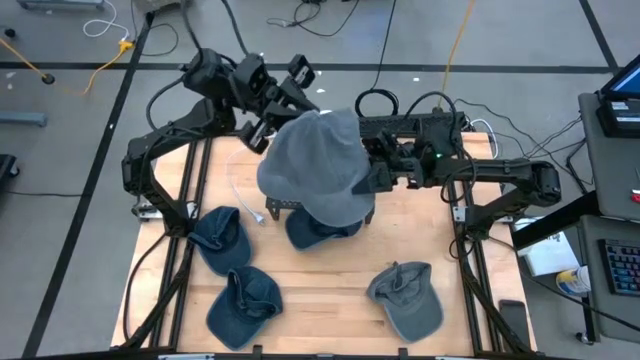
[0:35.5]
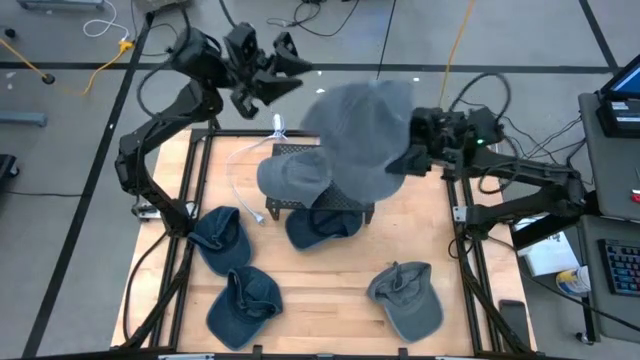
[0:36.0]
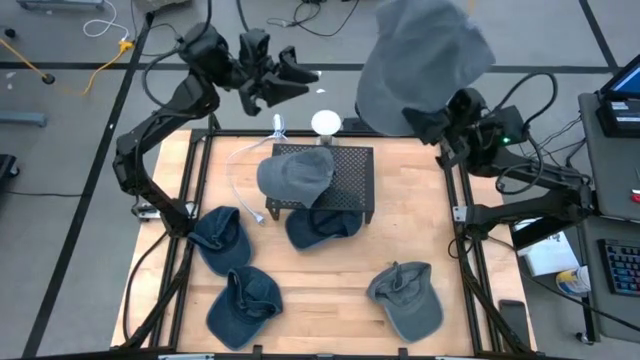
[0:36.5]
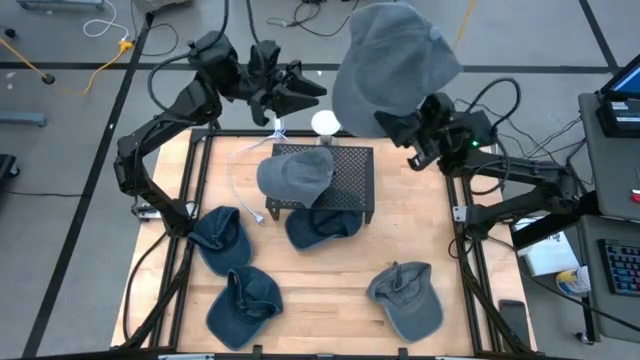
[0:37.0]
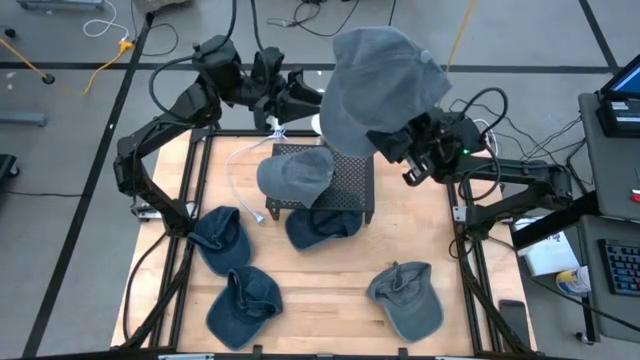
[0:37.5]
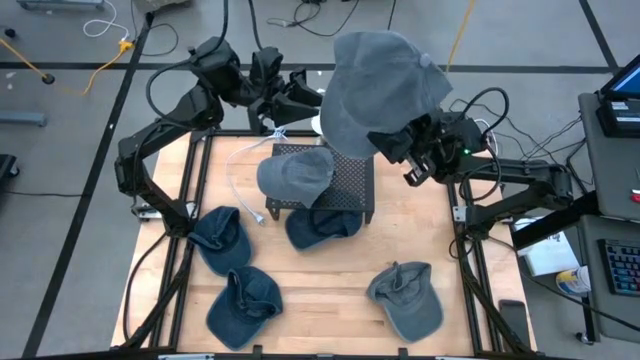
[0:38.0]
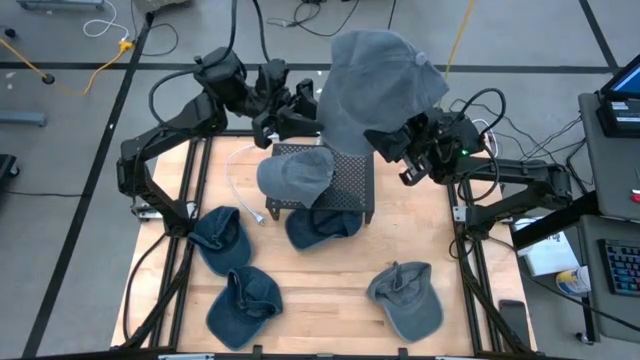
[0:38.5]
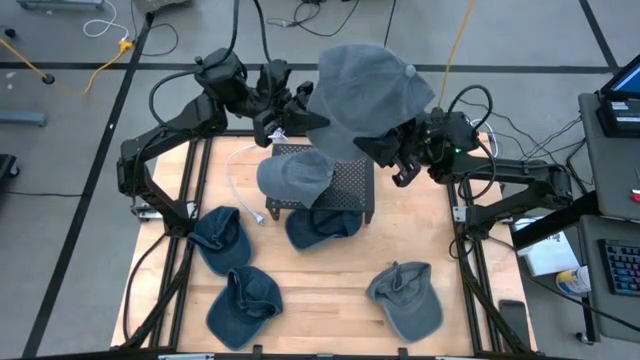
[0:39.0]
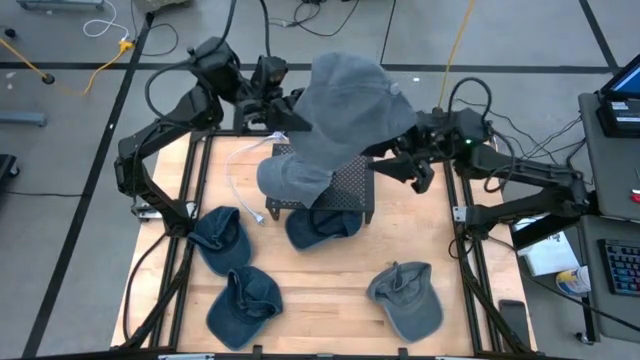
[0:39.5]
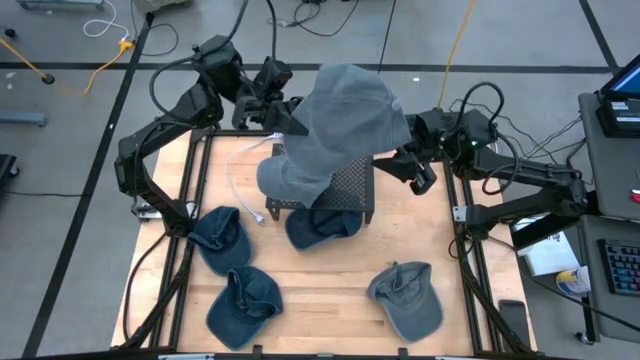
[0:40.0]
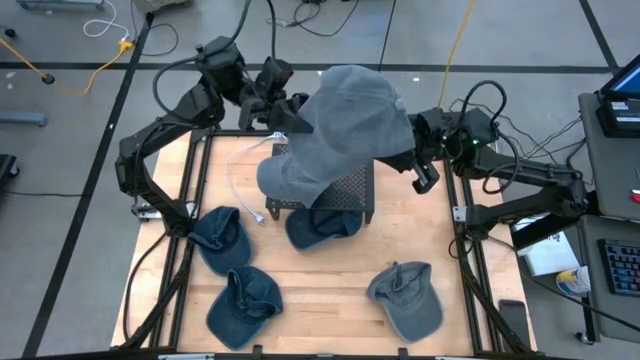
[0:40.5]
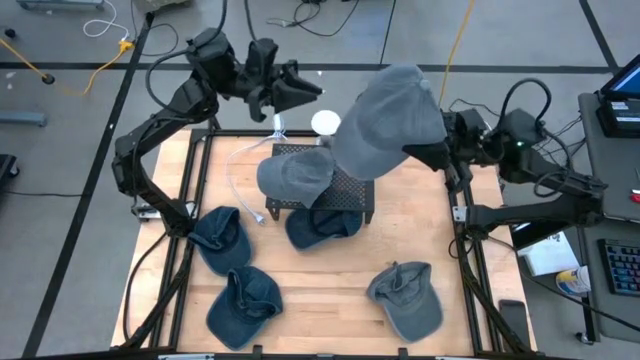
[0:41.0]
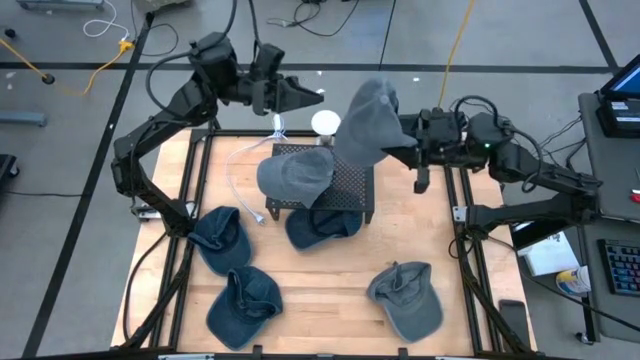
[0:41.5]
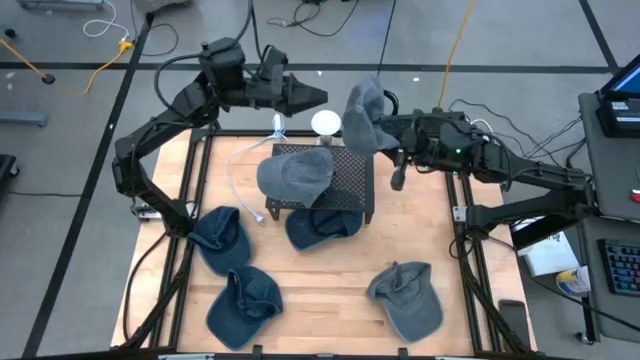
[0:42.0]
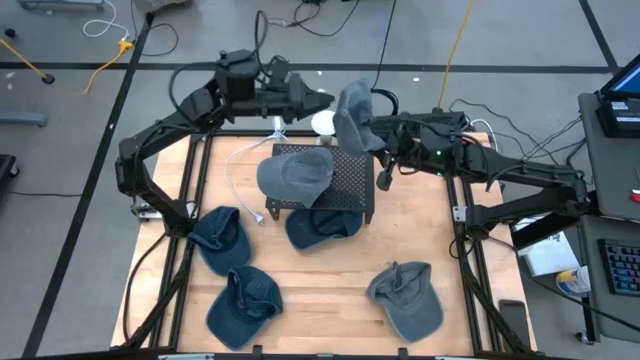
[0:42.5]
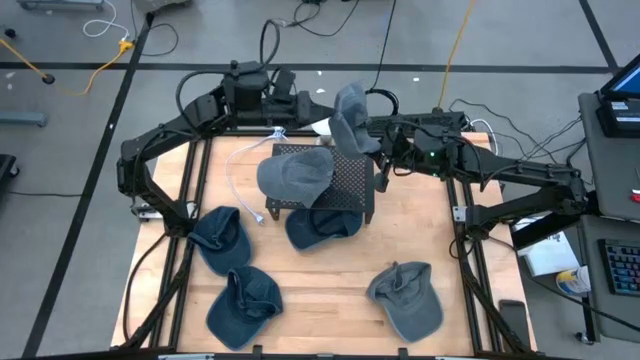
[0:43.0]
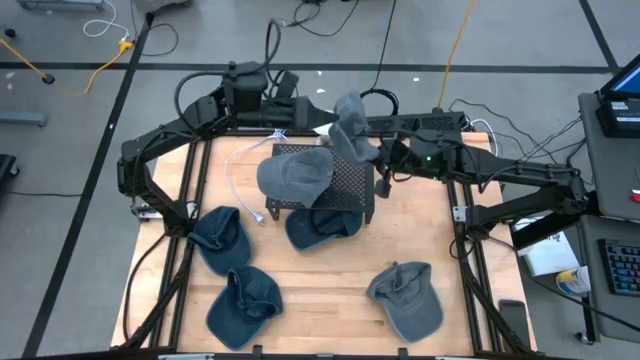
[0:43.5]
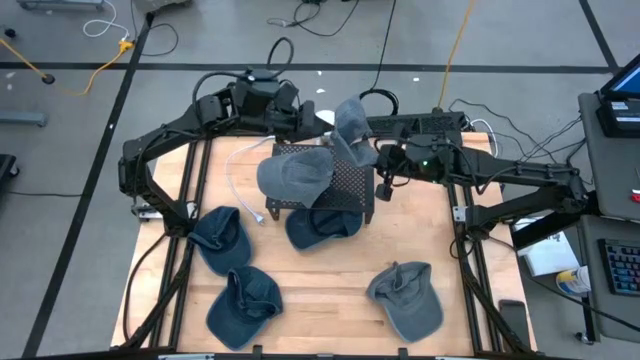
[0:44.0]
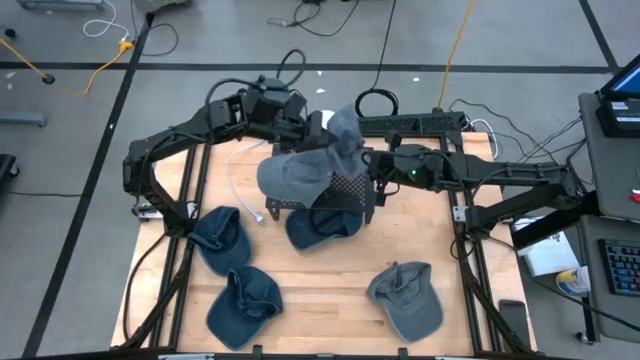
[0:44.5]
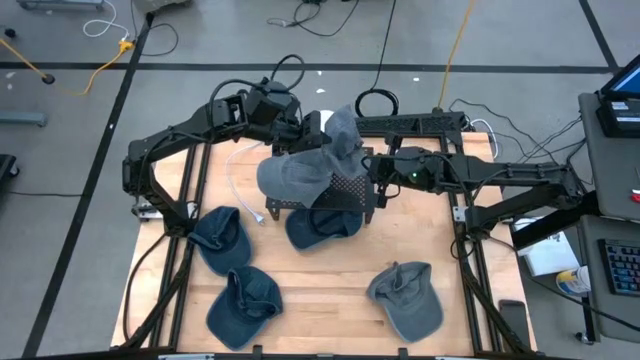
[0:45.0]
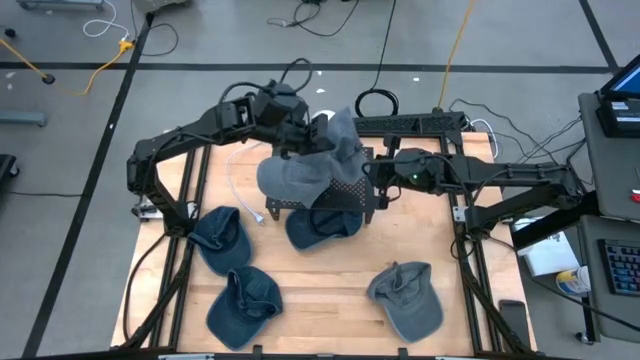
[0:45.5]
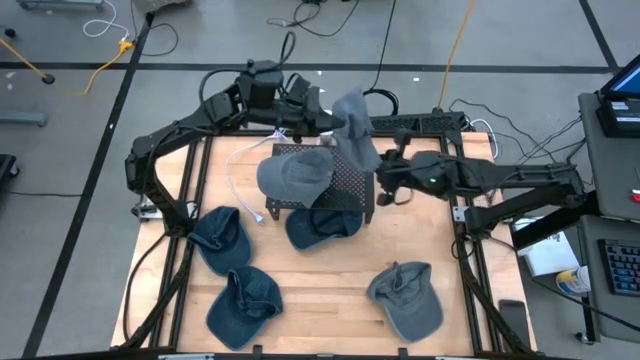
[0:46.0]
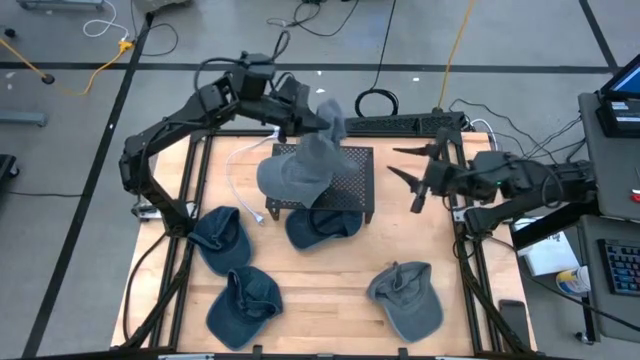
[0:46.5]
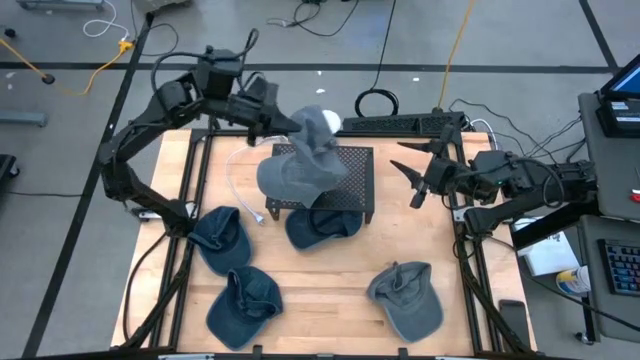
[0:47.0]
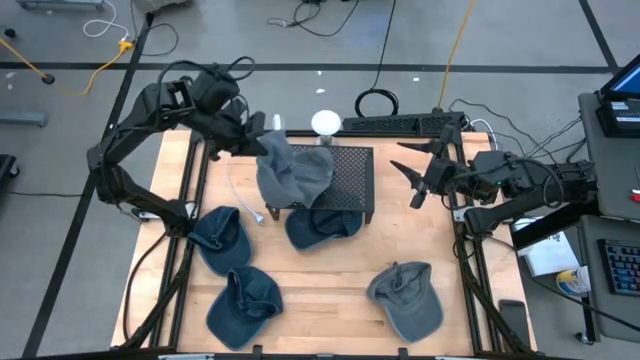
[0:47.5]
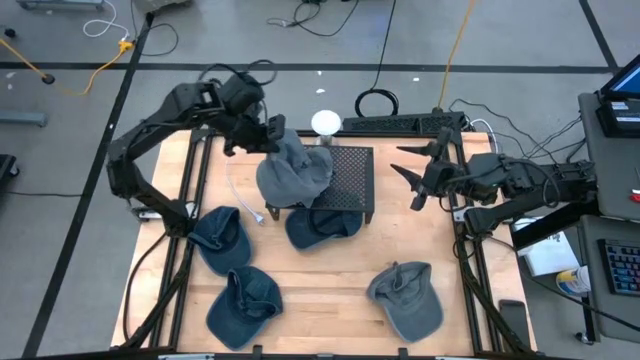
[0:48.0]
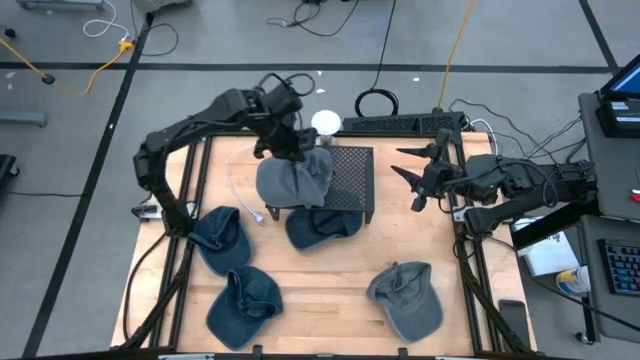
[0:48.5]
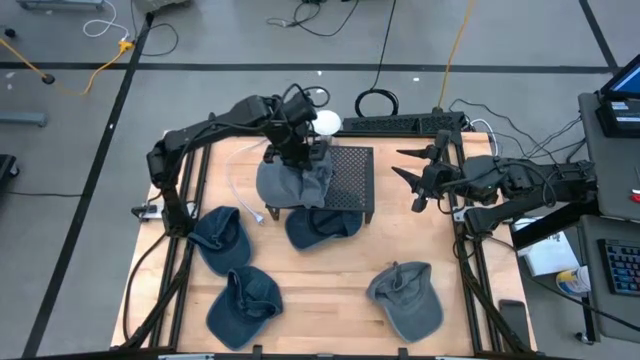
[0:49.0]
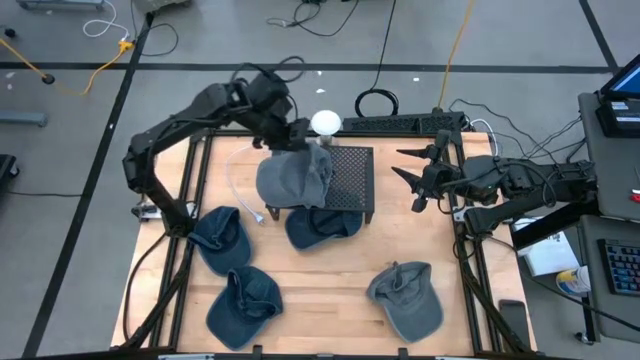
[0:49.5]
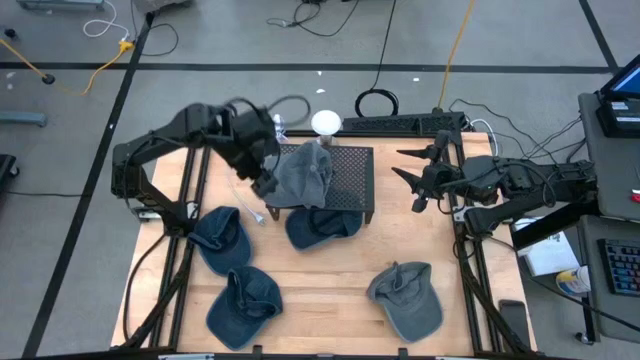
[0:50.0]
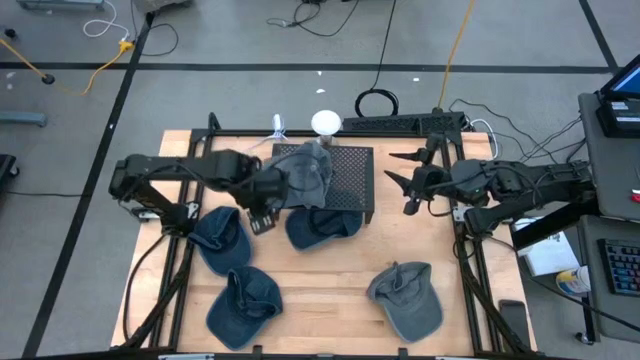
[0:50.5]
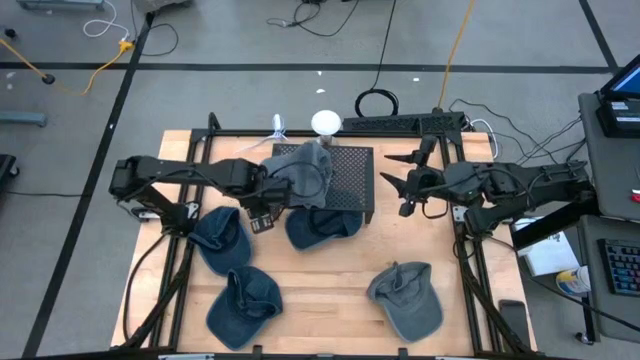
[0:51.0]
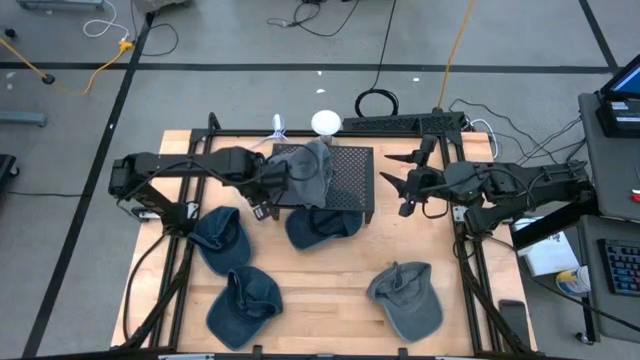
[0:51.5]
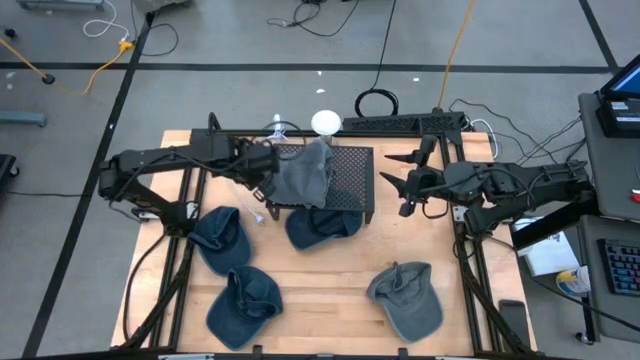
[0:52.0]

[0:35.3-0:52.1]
Task: Pick & Place hat
Stack the top gray cap on the gray cap on the shelf
